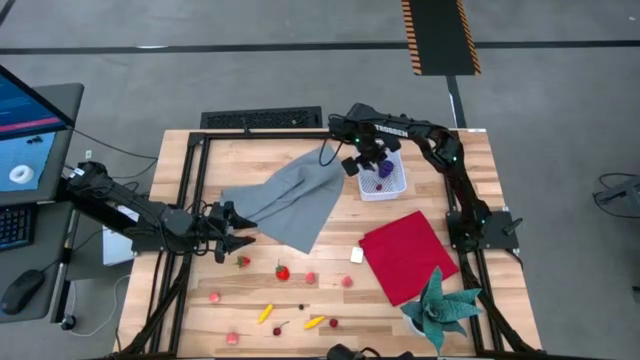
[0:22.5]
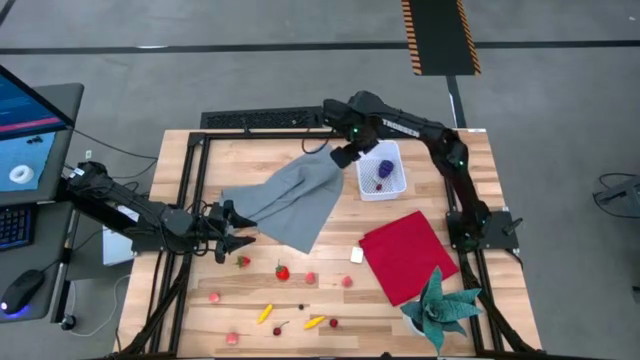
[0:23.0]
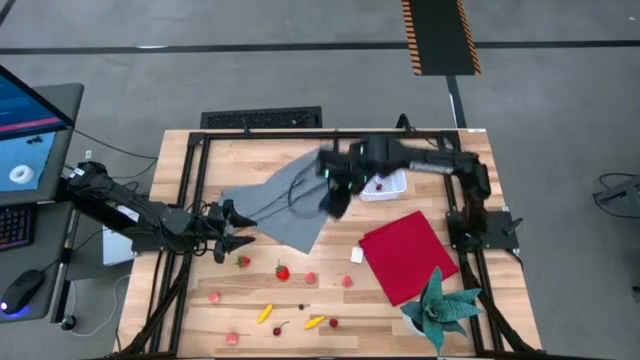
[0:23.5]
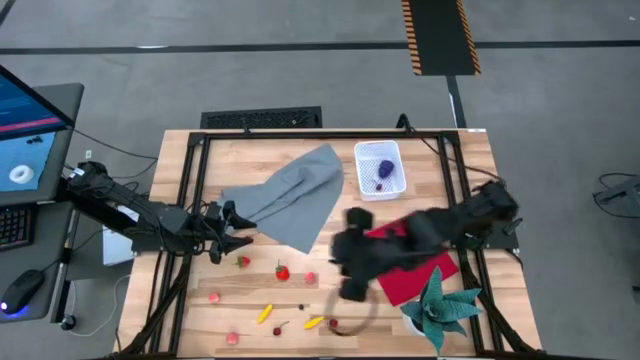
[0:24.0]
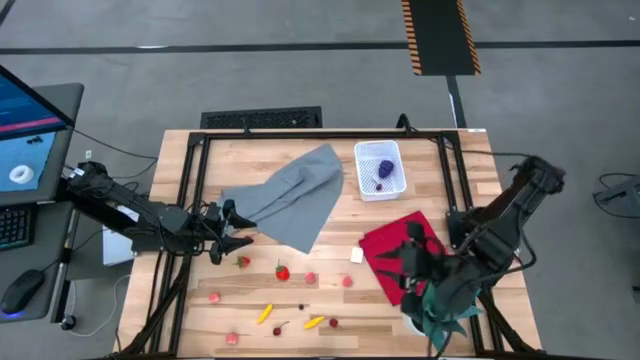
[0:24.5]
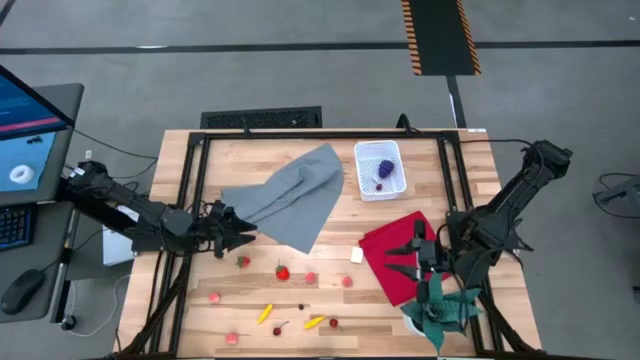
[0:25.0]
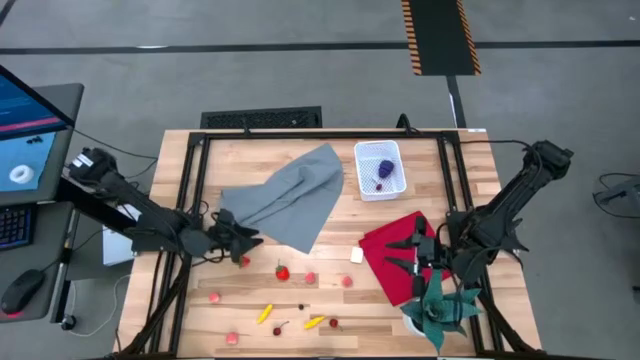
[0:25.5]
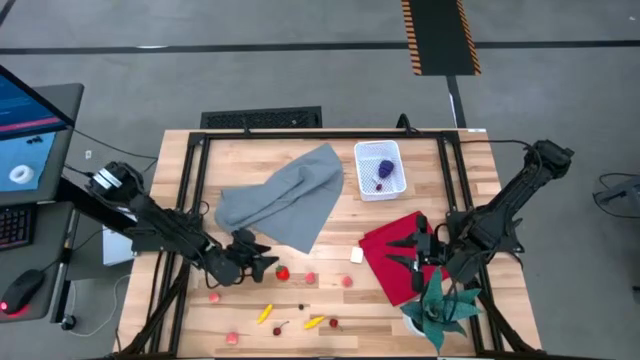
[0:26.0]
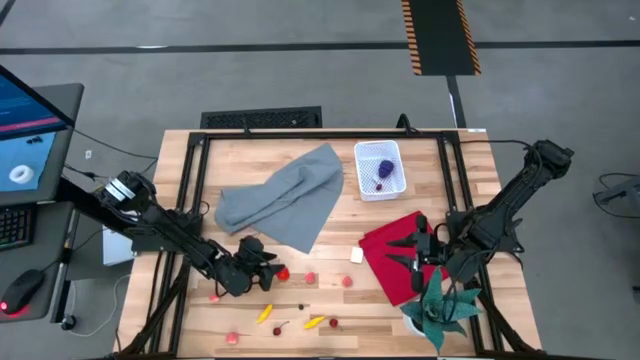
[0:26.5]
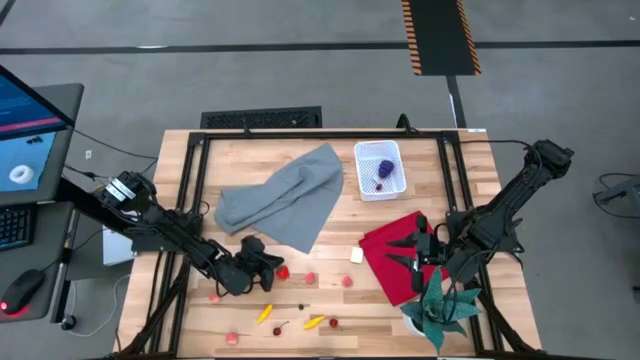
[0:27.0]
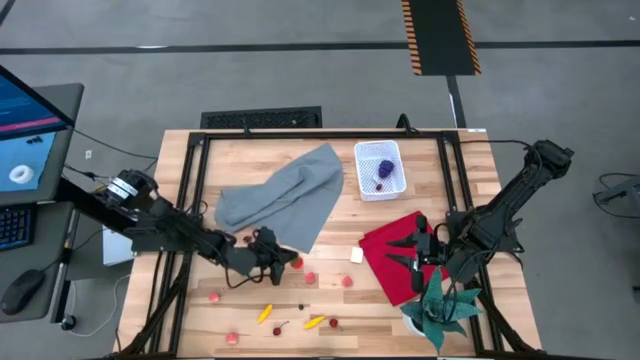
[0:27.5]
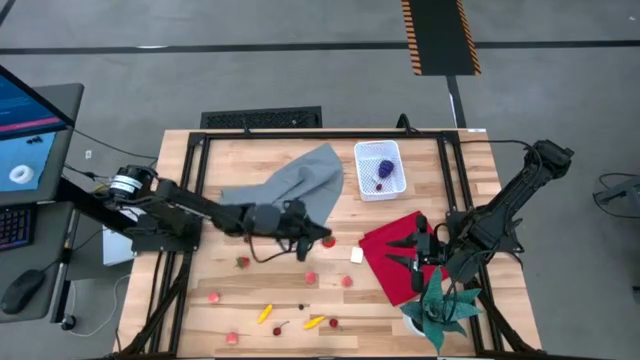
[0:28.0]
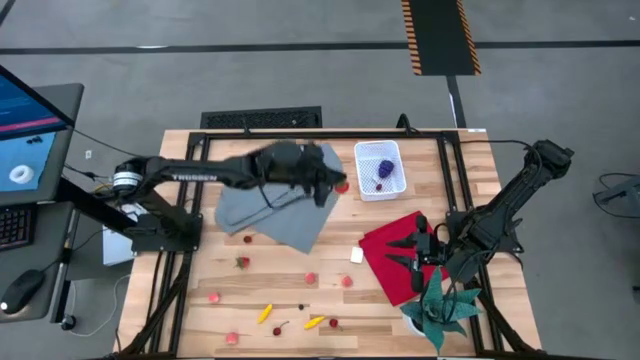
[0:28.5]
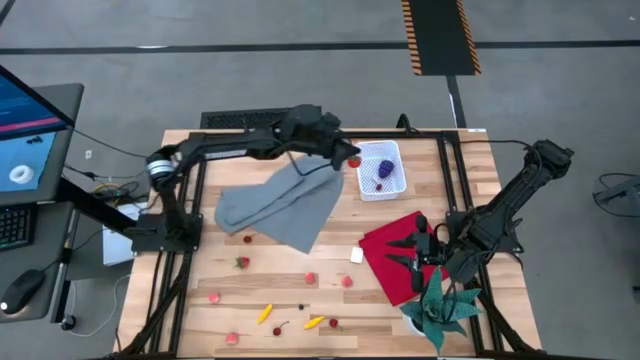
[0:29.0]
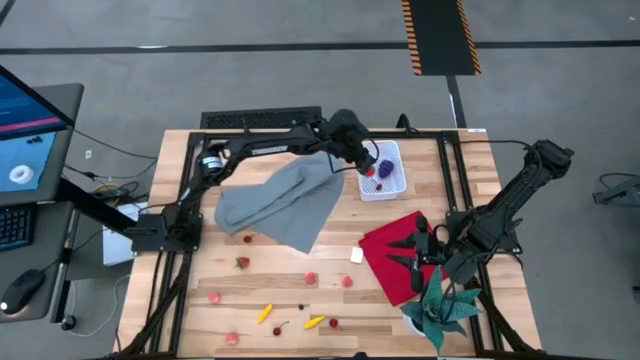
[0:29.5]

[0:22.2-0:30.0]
Task: Pick and placing Produce into tupperware
Put the red strawberry into the white bin

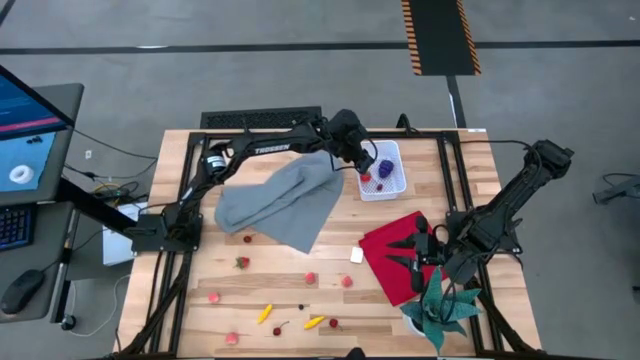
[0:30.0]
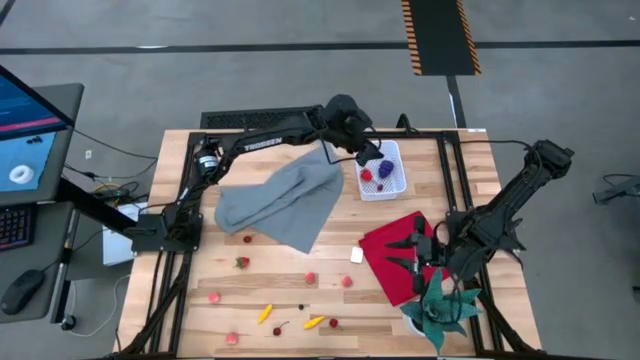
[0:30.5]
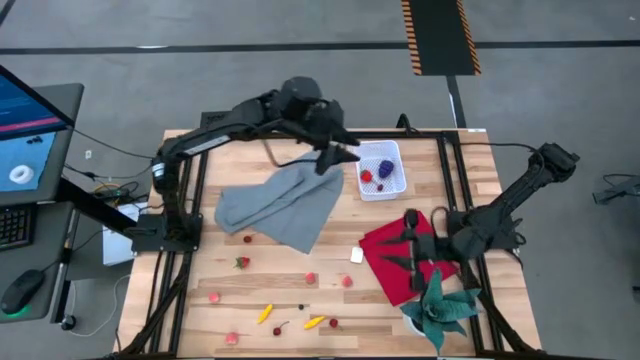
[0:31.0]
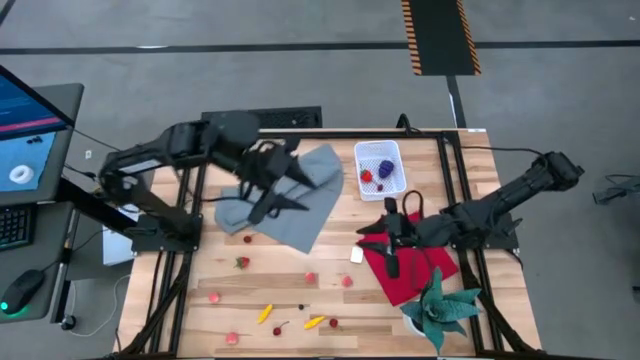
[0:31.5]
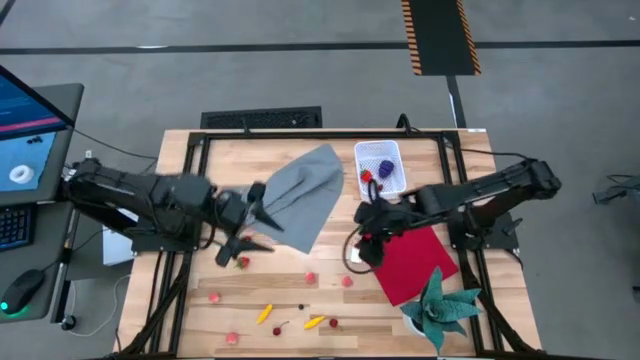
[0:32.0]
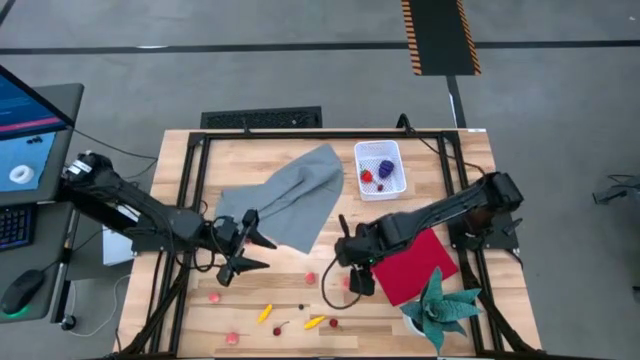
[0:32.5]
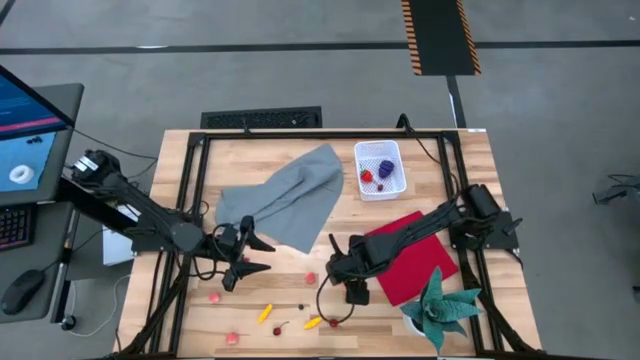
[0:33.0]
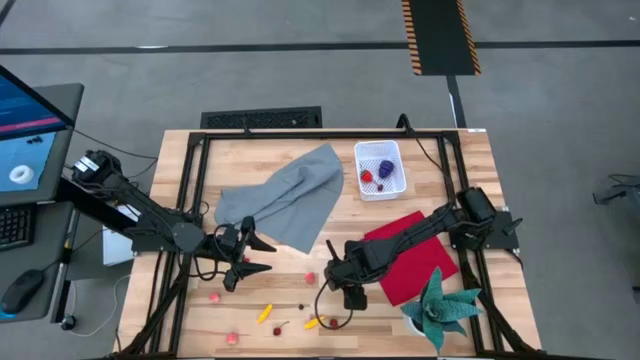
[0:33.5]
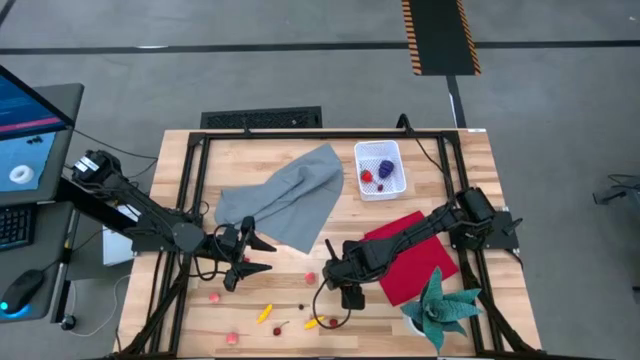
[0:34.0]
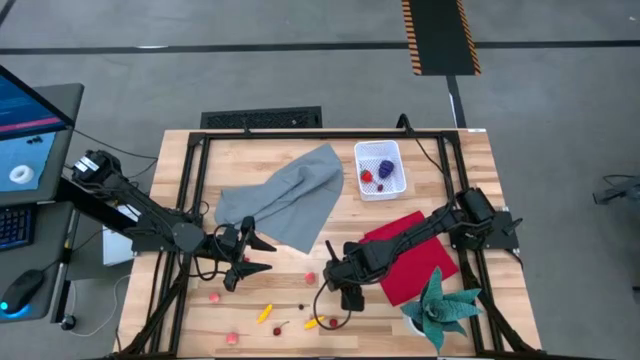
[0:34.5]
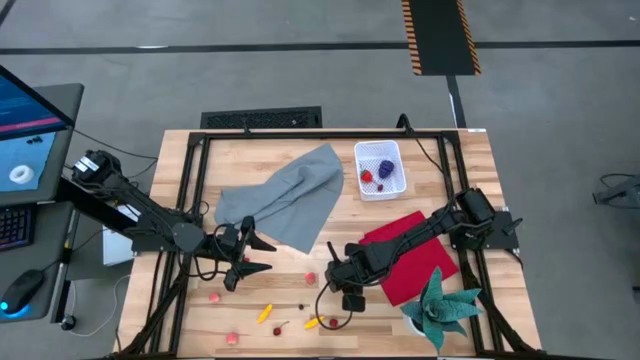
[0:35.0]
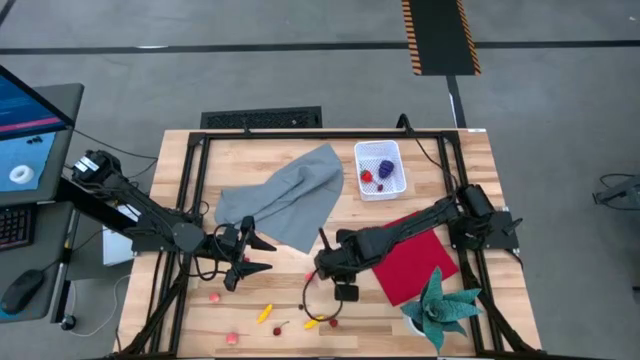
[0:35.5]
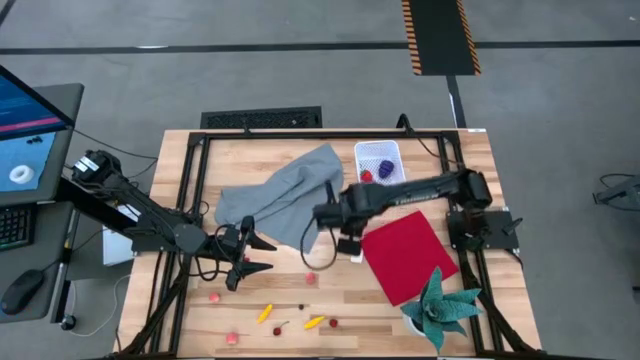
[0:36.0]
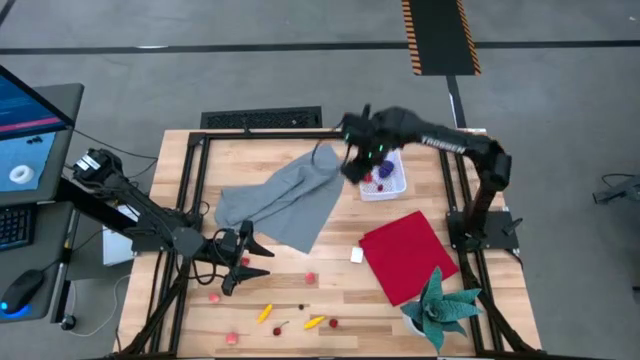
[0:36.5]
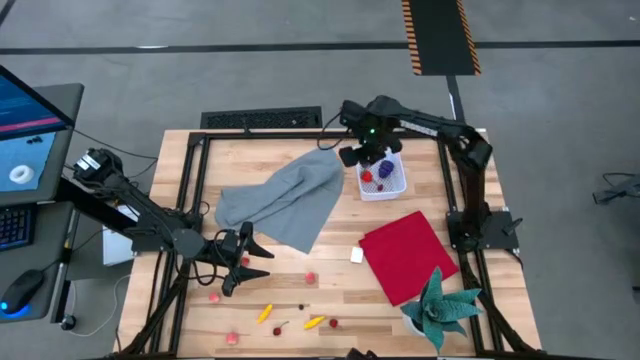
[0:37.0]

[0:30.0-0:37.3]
Put the pink peach into the white bin

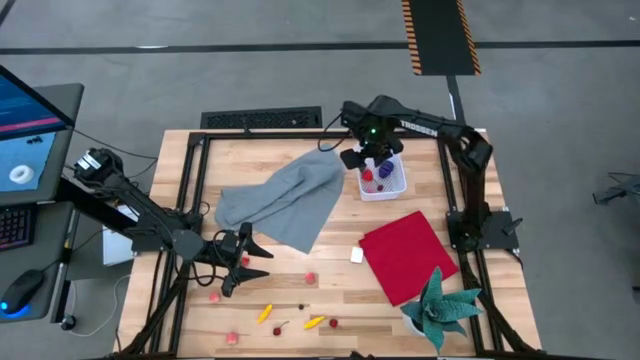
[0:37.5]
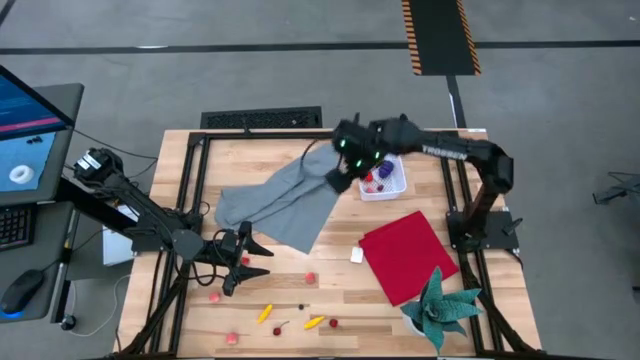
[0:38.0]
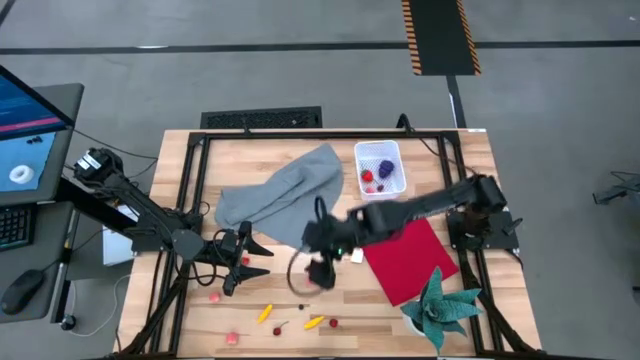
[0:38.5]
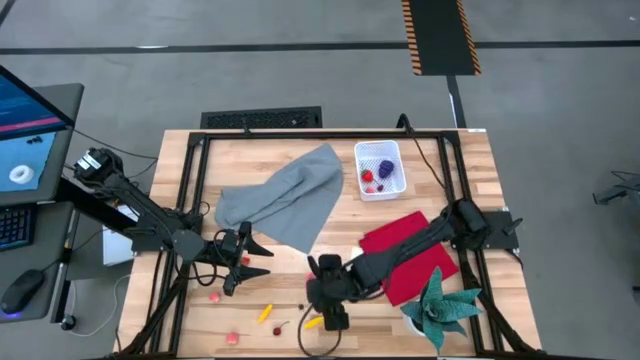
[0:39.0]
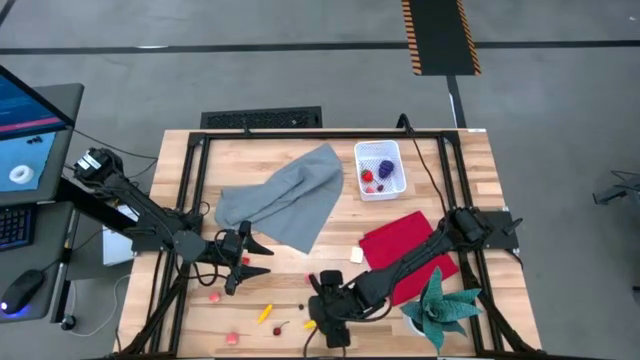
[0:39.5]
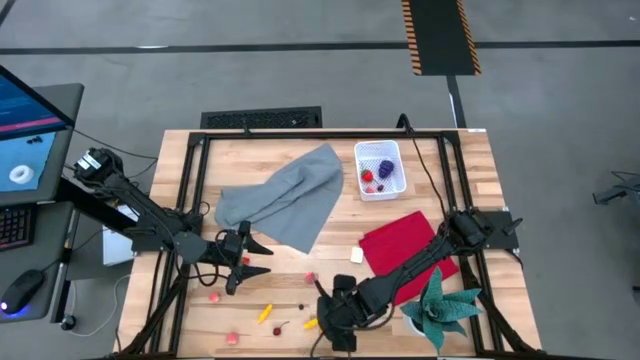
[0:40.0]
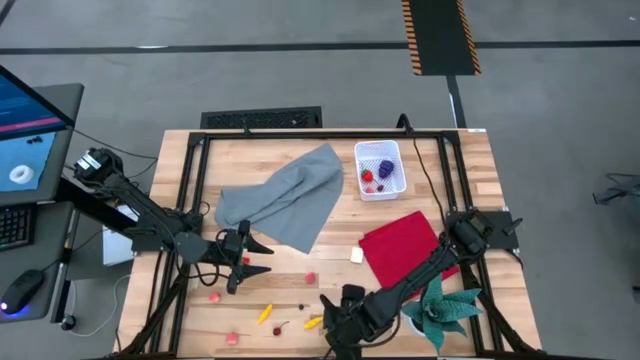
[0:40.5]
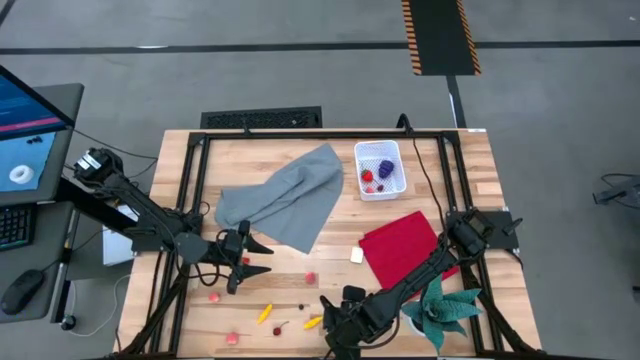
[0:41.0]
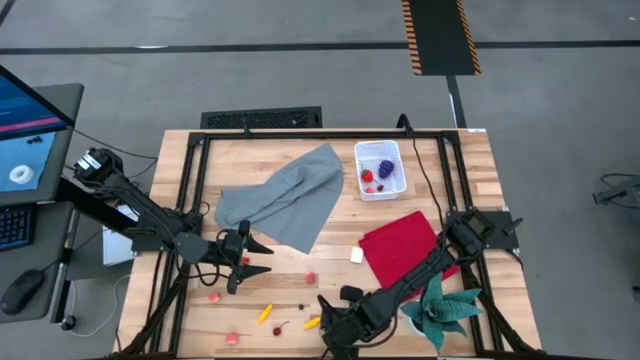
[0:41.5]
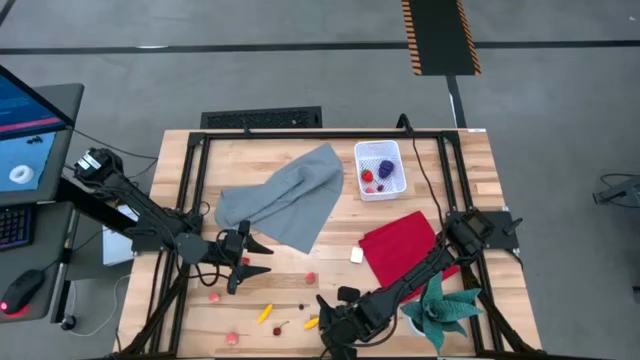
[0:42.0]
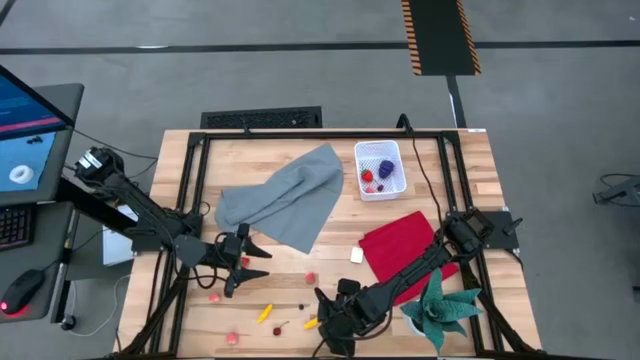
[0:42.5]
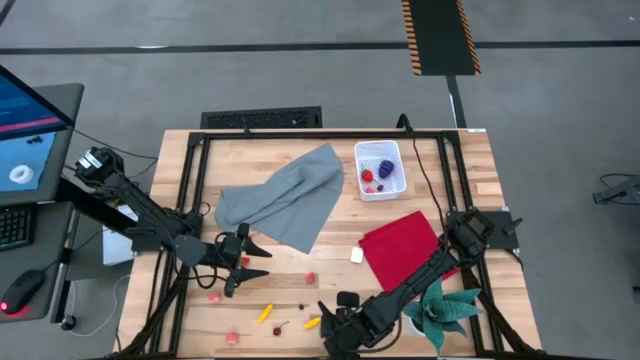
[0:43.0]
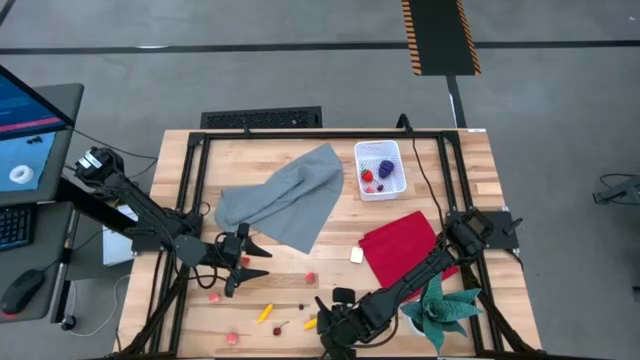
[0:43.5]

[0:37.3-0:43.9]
Put the red cherry into the white bin
